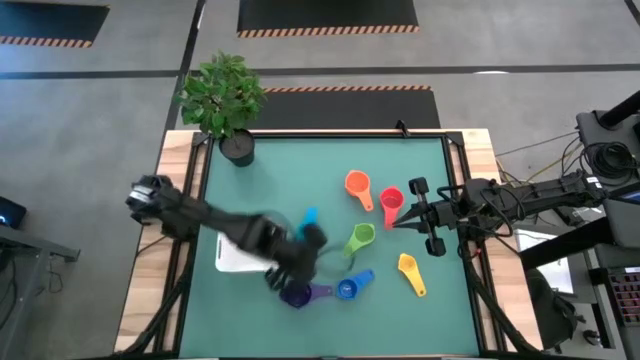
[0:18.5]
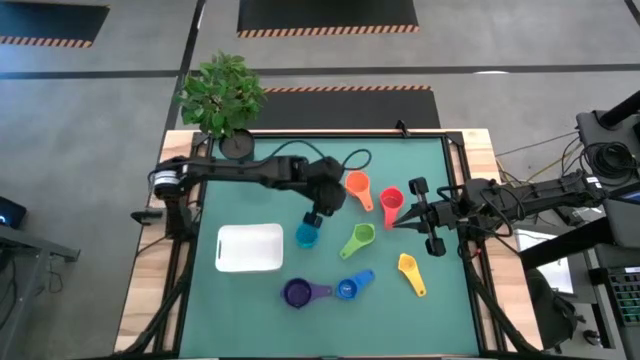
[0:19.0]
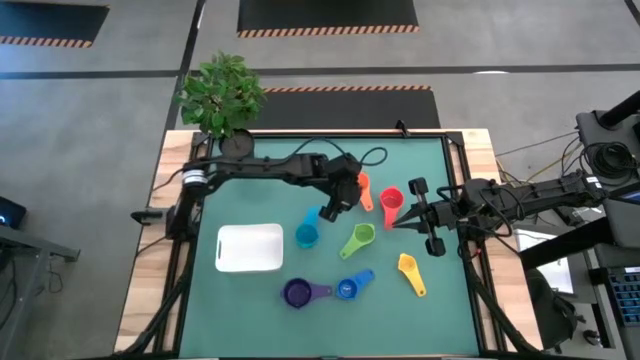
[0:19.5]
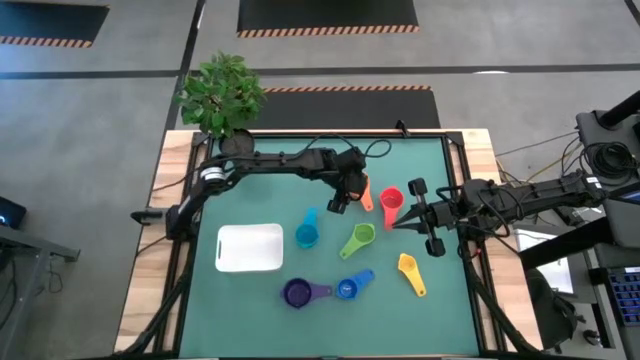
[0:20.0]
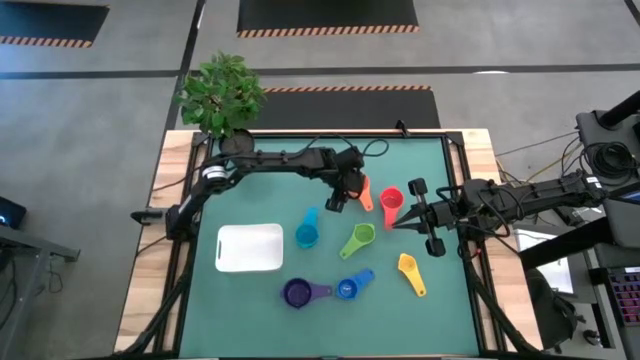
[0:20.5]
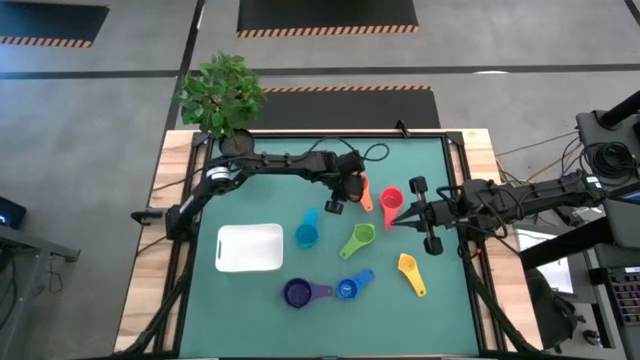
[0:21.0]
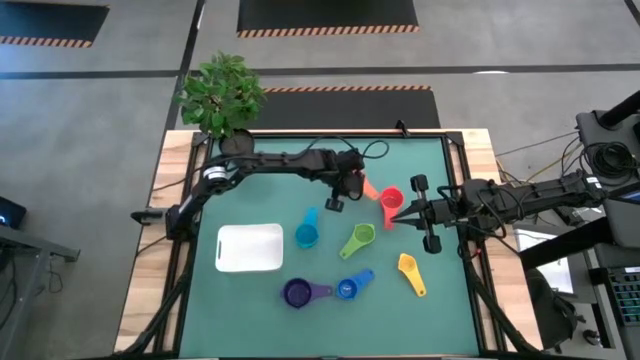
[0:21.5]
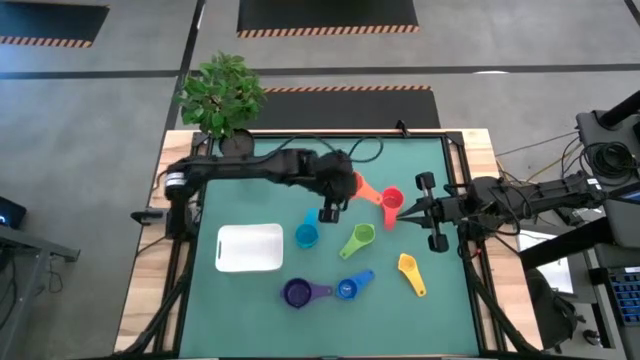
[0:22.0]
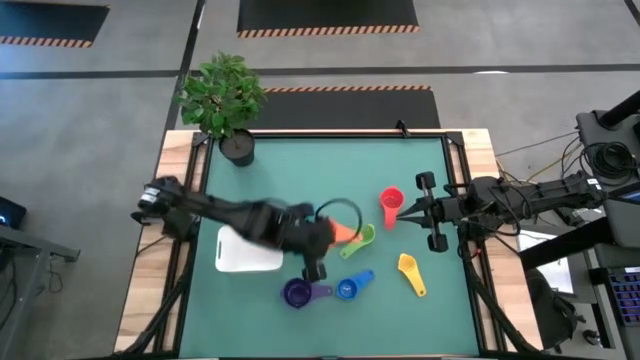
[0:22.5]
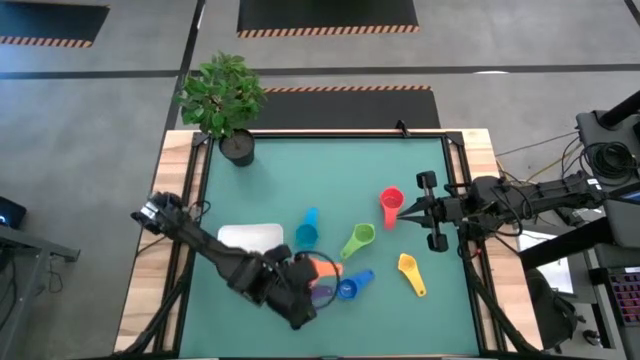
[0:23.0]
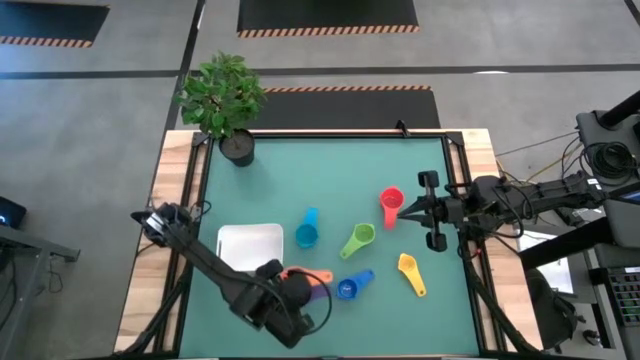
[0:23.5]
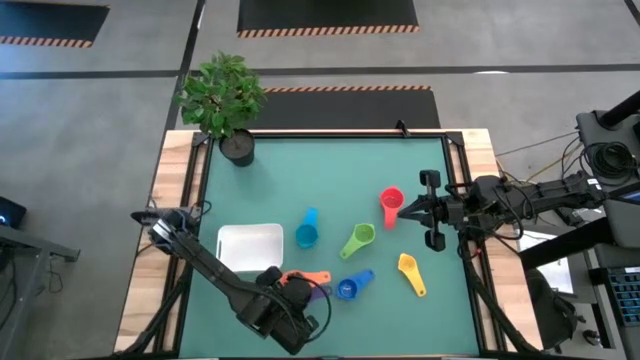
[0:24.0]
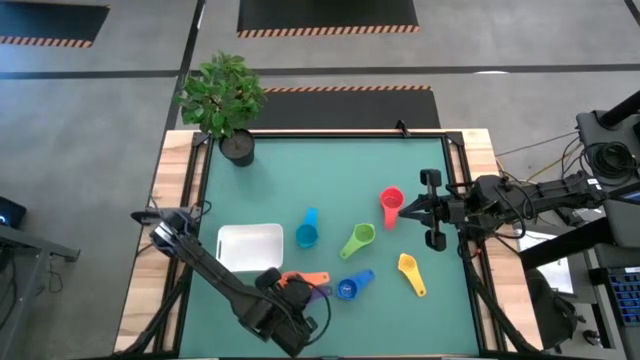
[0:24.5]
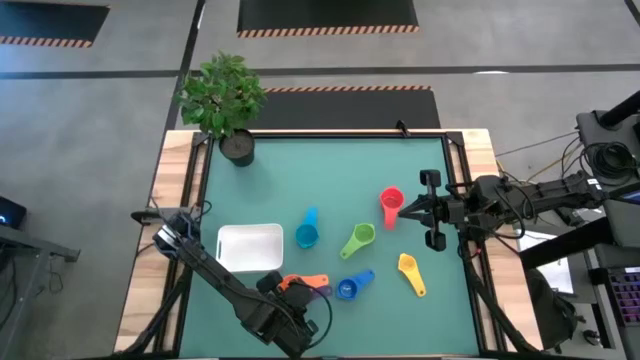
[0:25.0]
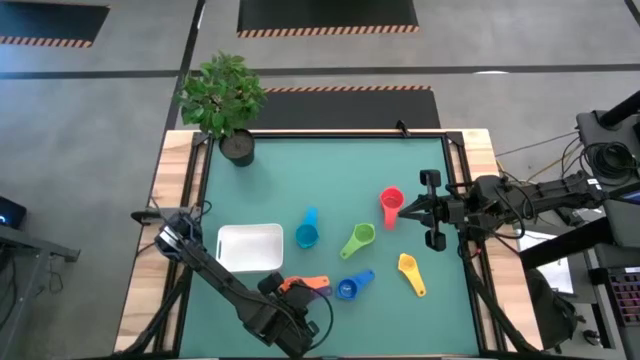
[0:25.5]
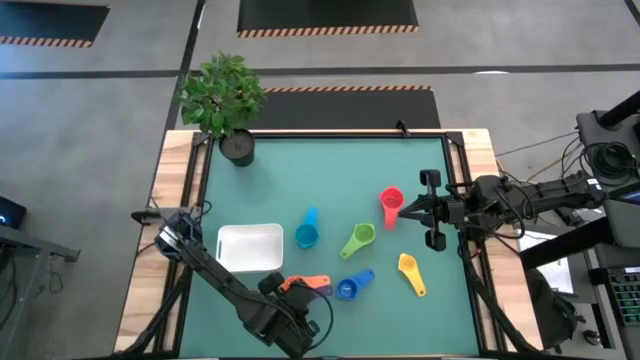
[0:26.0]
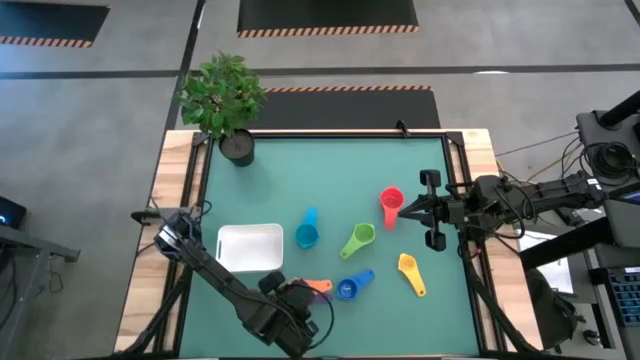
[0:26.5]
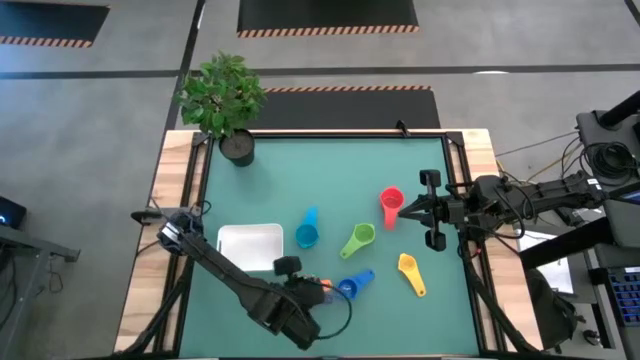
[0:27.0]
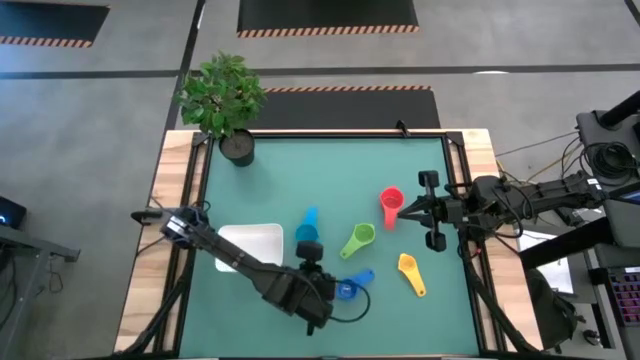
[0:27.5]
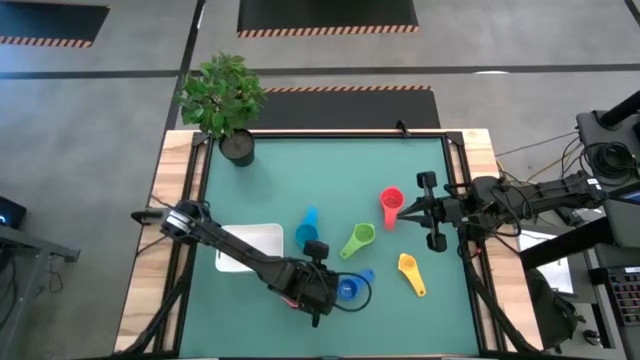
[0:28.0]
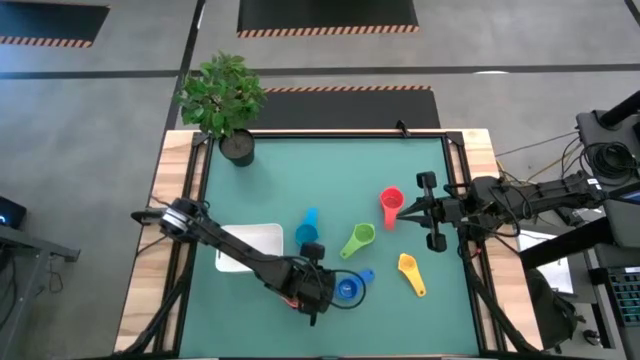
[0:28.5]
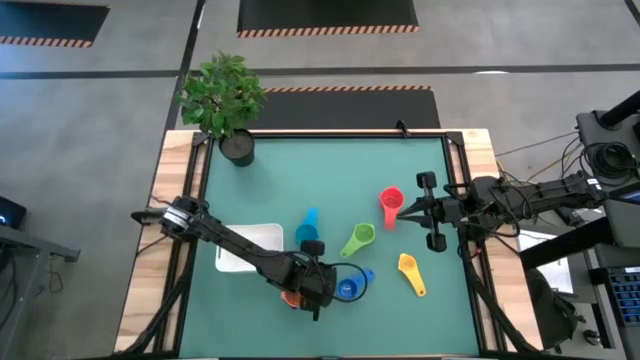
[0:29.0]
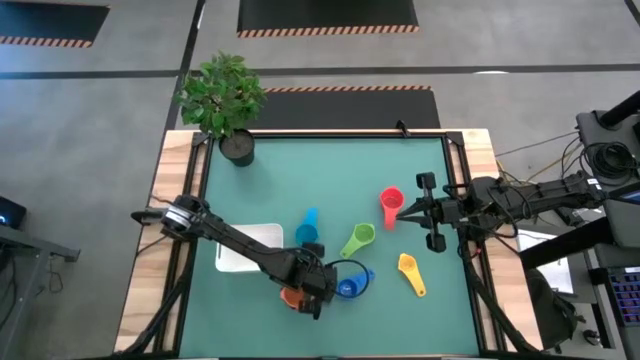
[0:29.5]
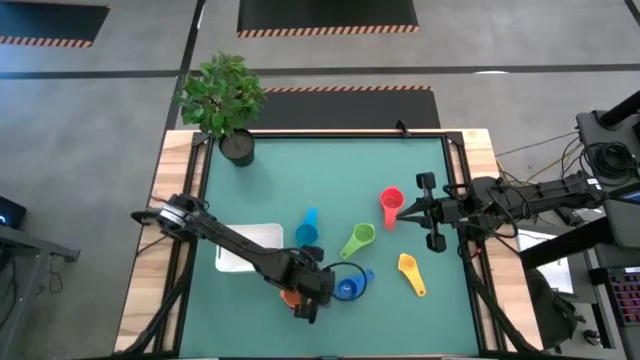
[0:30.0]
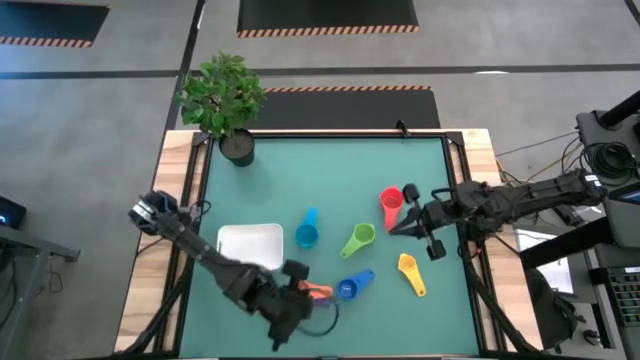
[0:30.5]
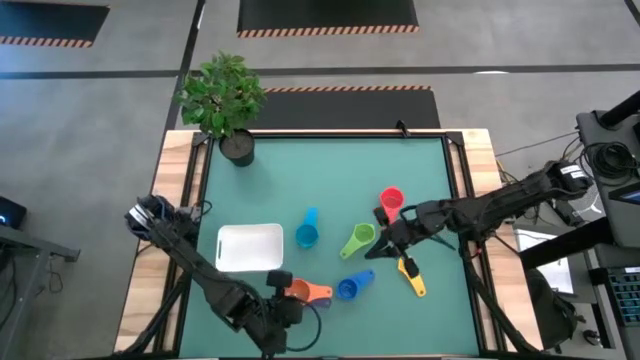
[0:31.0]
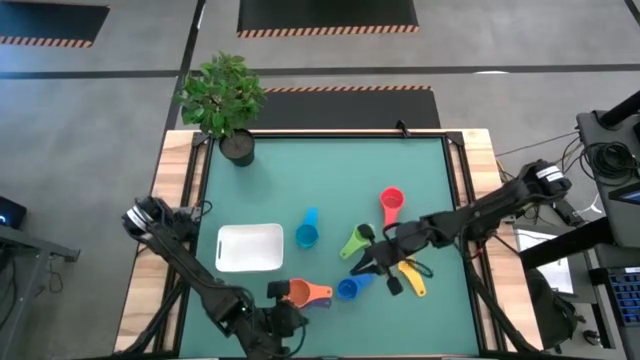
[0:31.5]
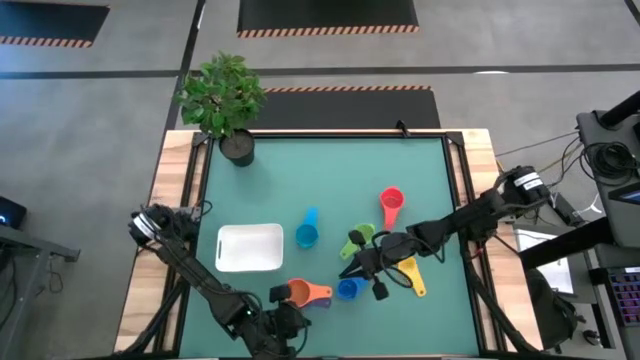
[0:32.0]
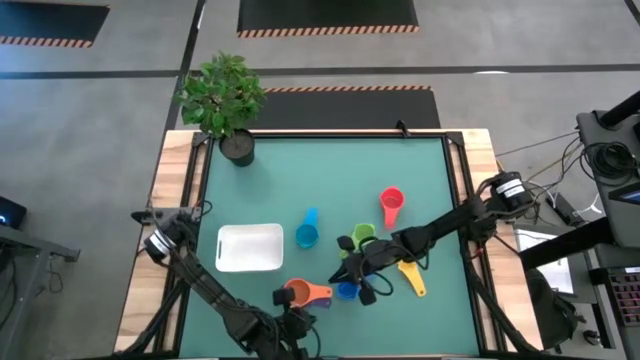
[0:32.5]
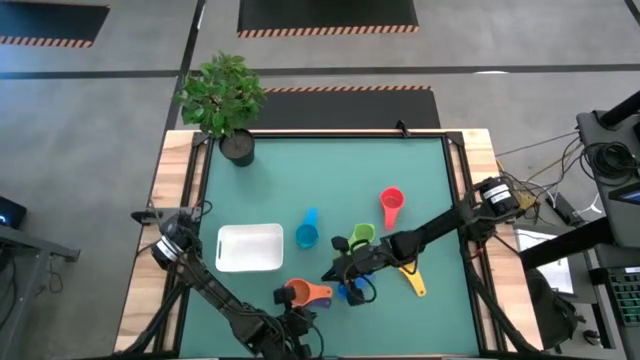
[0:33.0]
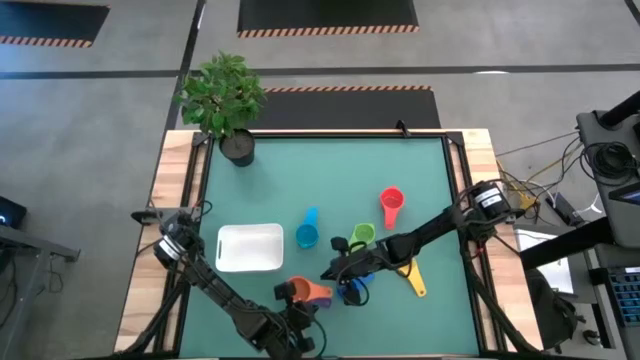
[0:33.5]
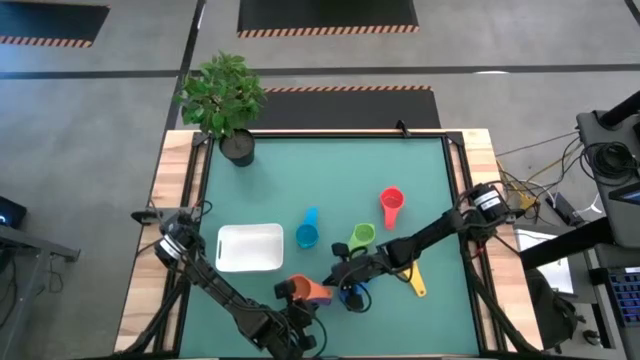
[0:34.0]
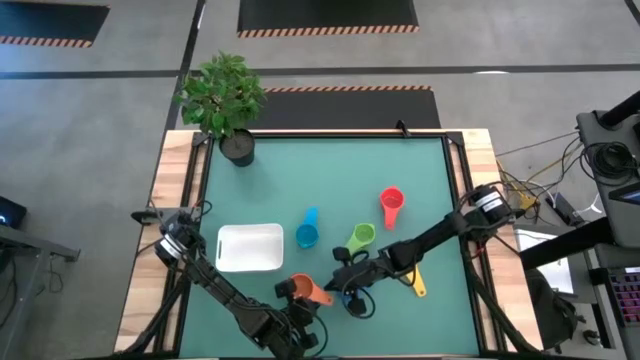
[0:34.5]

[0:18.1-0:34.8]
Task: Nest measuring cups in basket
Stack the orange measuring cup in the top of the purple measuring cup

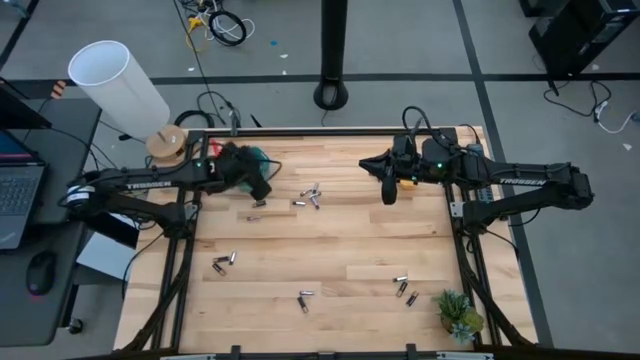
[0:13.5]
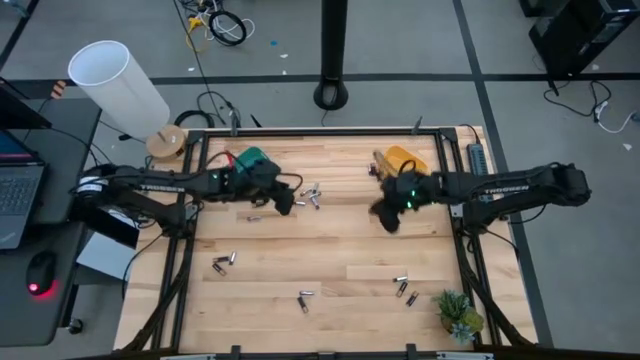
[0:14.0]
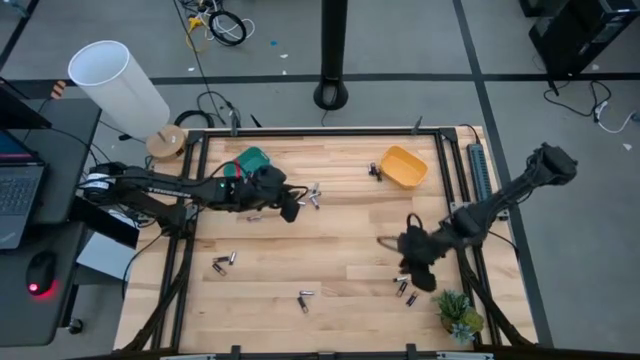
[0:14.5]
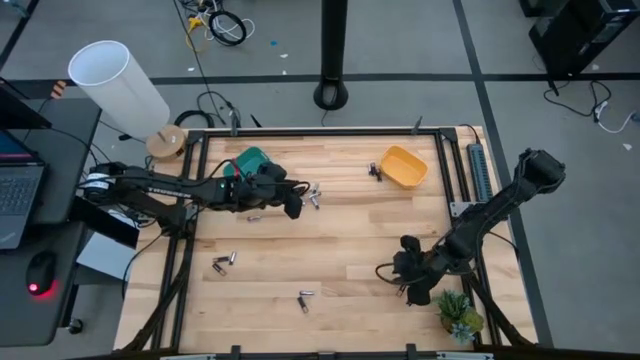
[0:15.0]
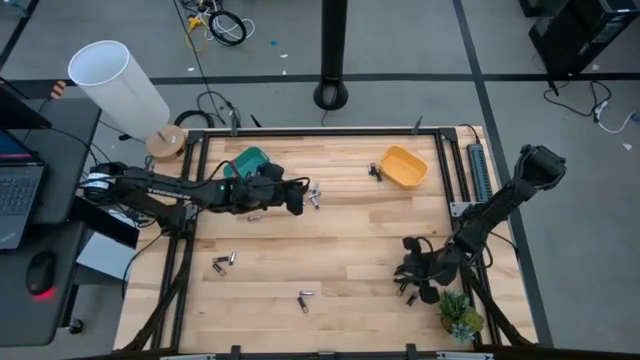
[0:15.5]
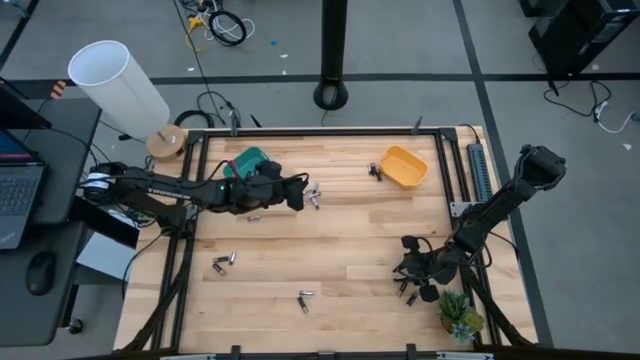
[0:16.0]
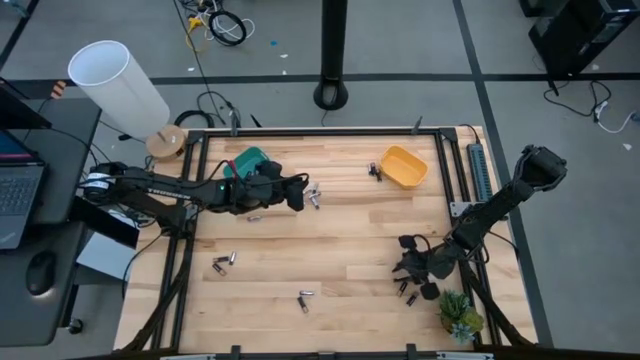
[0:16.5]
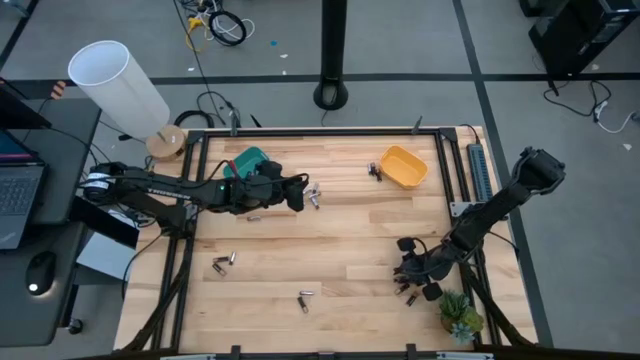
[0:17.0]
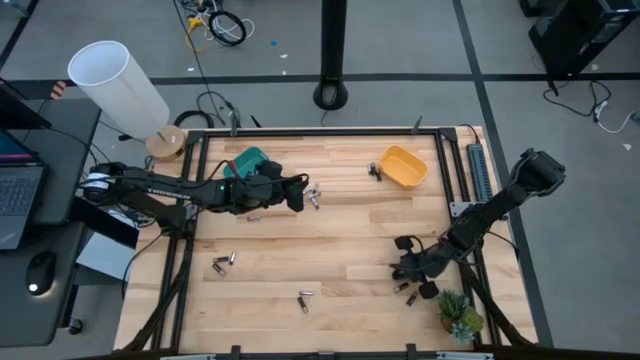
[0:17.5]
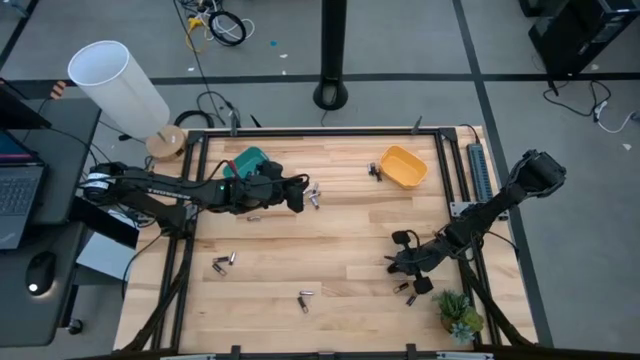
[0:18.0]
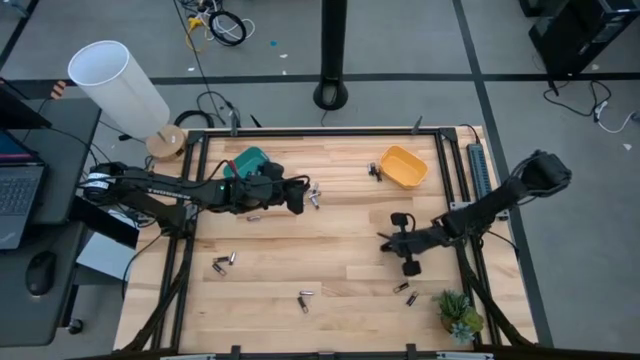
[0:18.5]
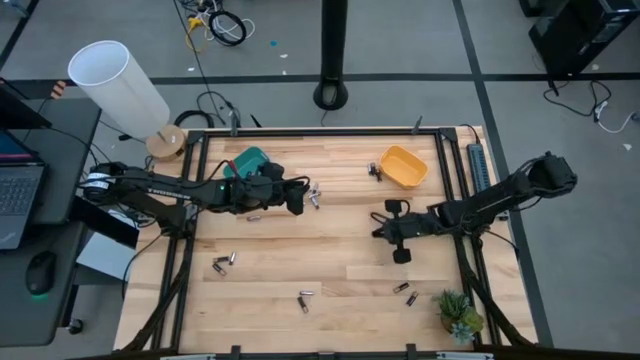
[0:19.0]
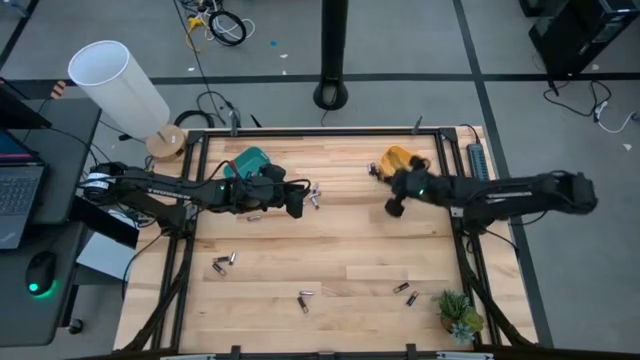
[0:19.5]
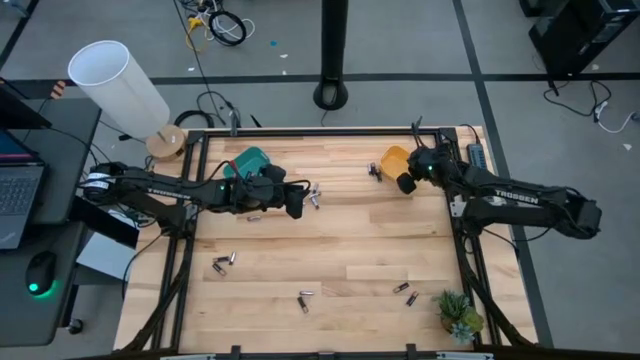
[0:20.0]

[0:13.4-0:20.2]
Task: Sort batteries
Put the silver battery into the yellow bin
